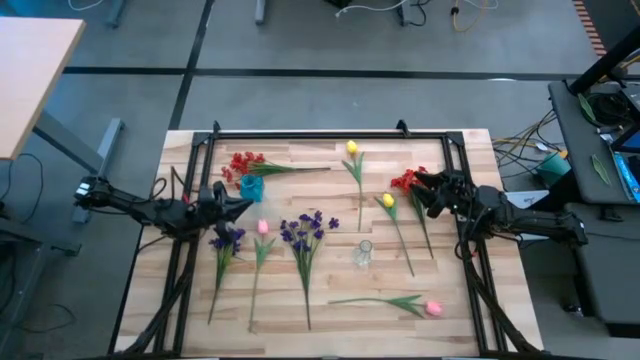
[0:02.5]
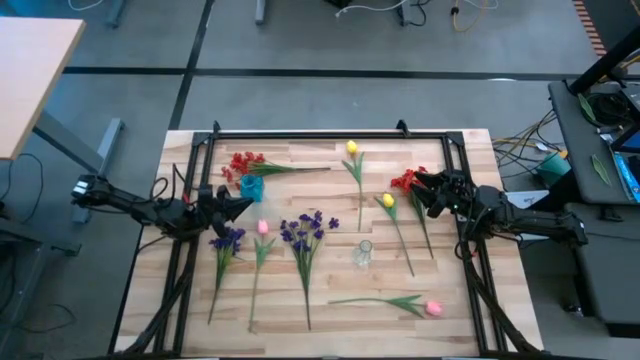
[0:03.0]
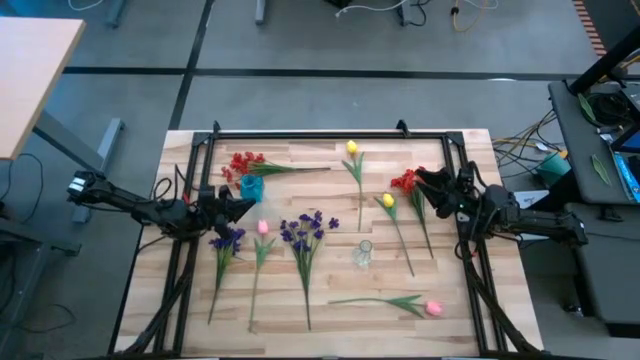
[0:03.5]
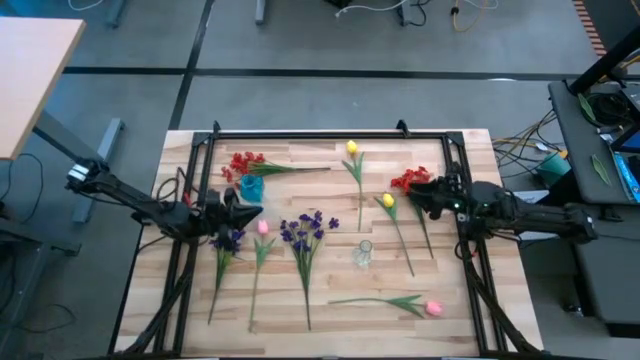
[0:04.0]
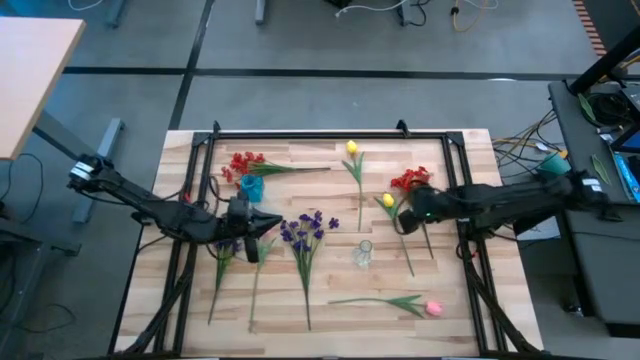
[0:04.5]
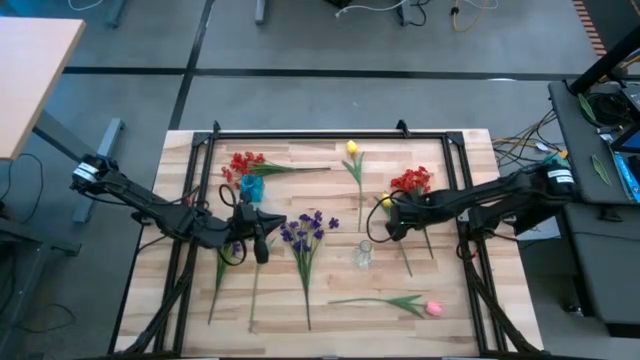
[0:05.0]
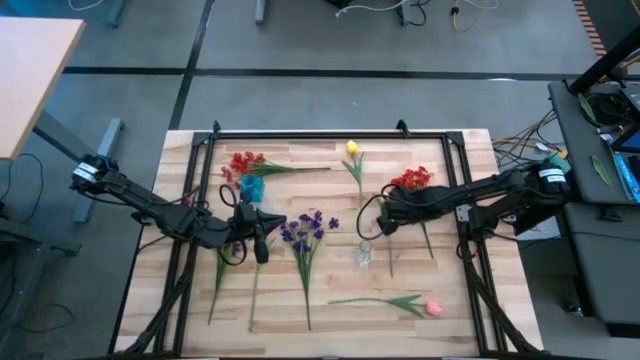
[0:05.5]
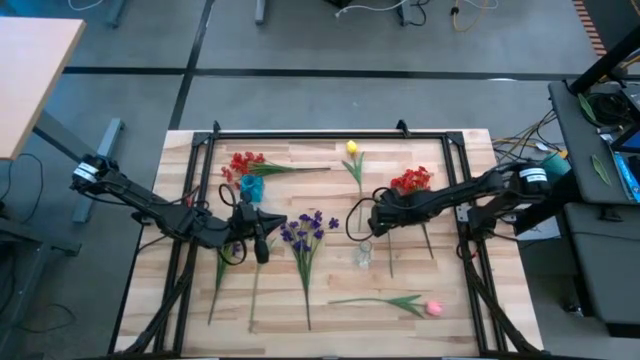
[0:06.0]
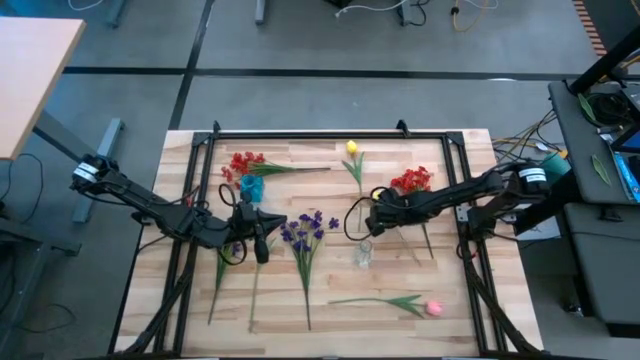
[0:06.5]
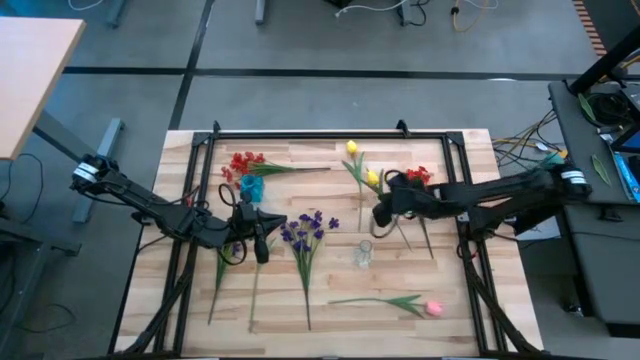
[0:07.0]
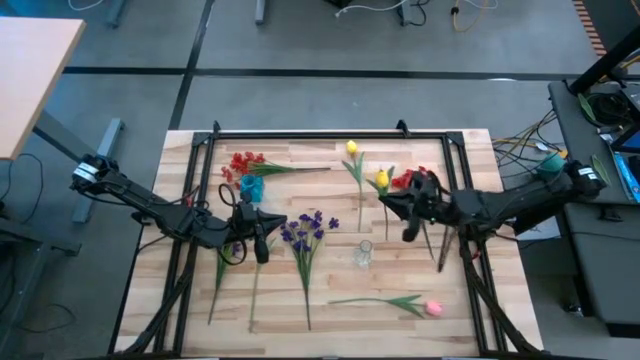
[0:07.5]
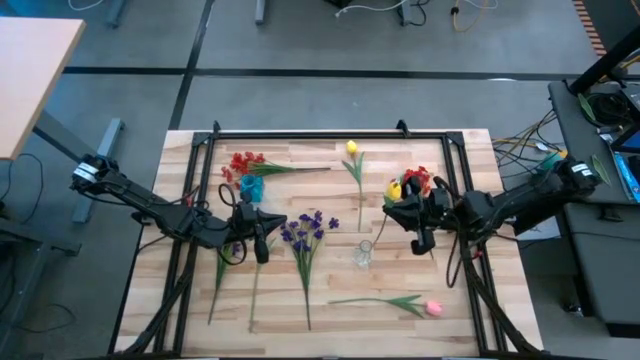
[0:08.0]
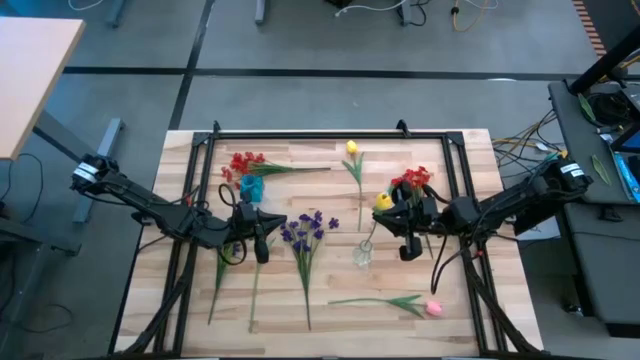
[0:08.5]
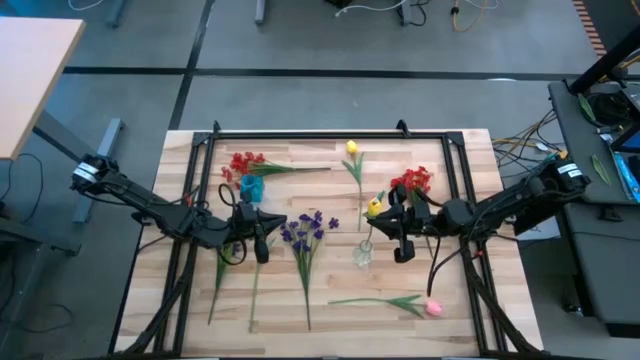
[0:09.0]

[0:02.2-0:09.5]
Task: Sort flowers into vase by color
Put the bottom yellow tulip into the transparent vase

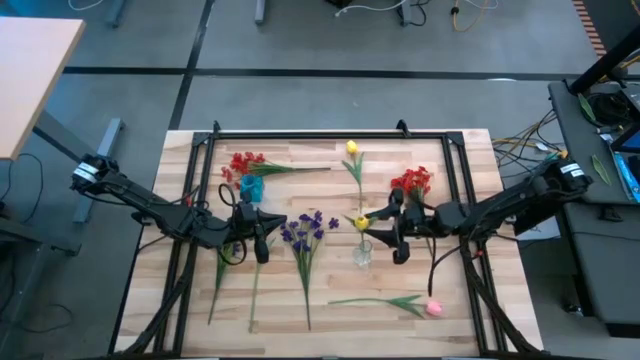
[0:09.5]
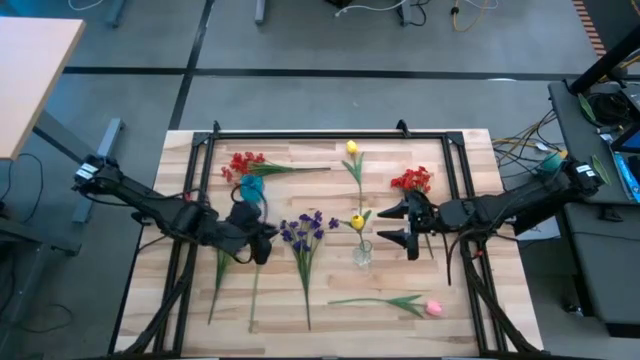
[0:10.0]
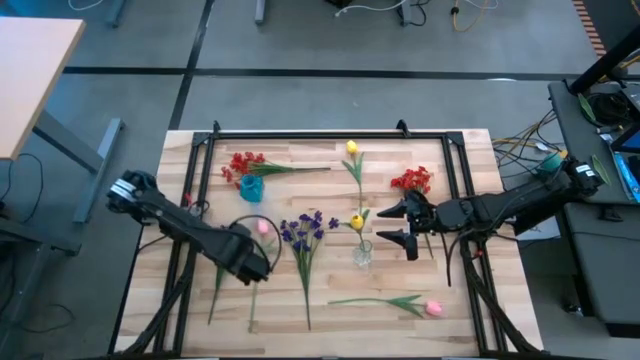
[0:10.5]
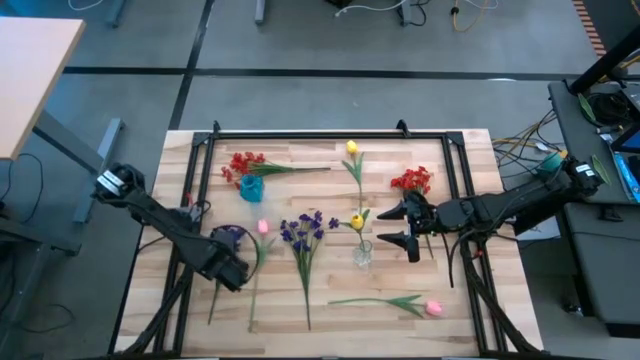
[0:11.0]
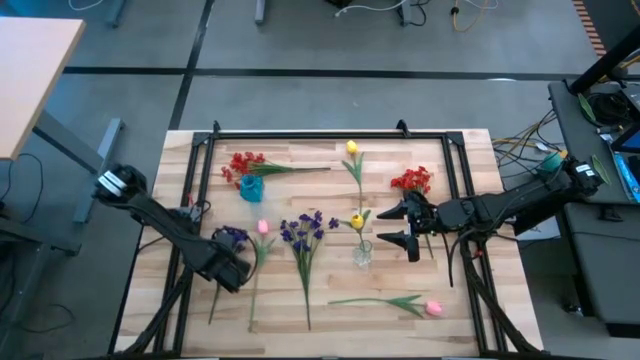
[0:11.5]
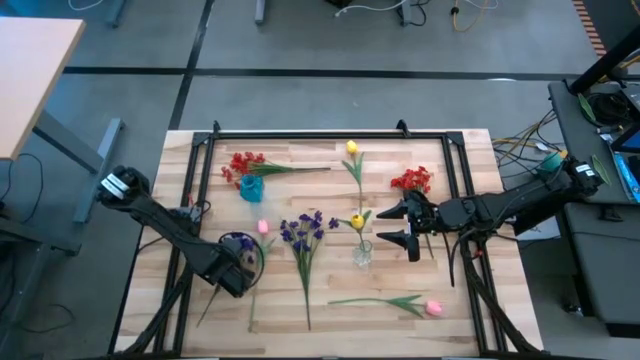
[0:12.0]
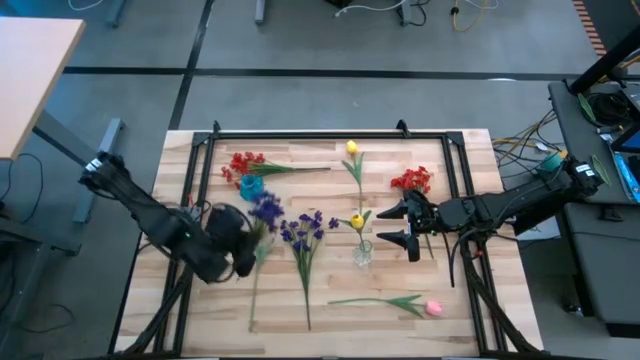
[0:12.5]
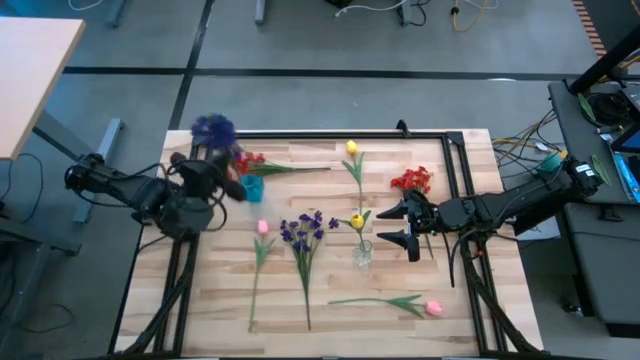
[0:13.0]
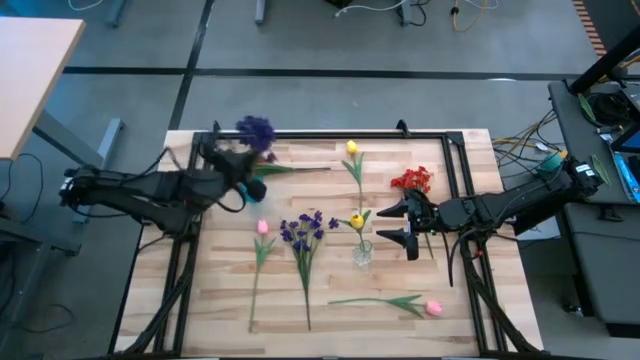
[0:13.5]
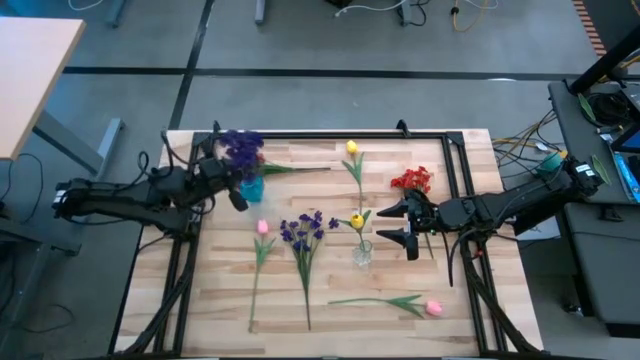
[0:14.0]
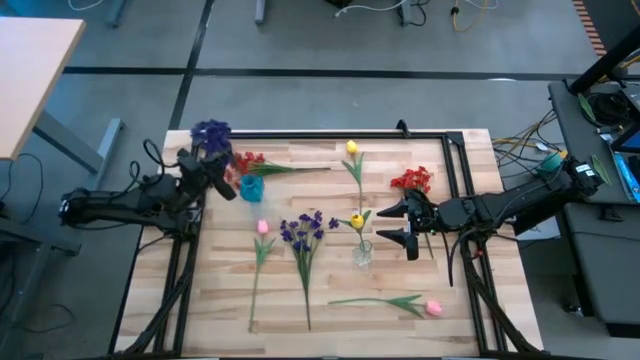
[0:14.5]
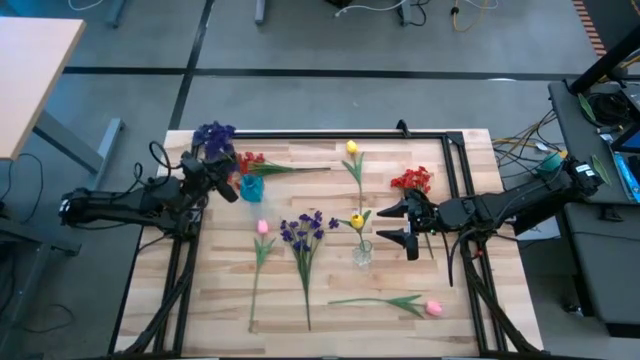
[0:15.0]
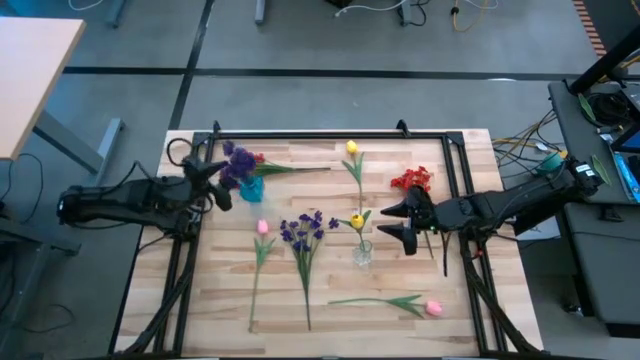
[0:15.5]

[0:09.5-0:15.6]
Put the left violet flowers into the blue vase

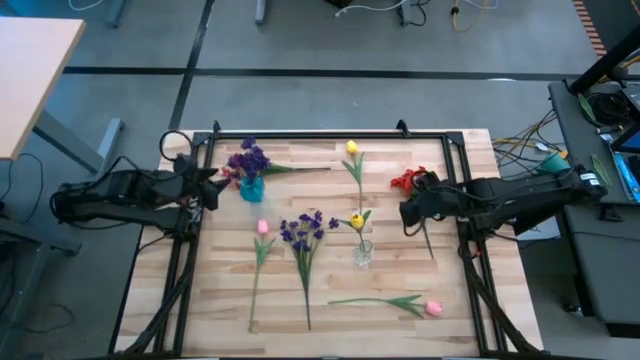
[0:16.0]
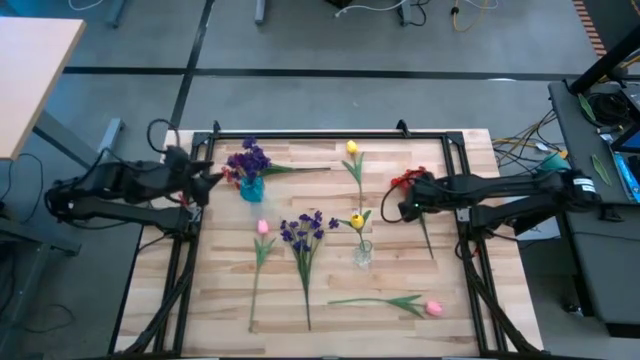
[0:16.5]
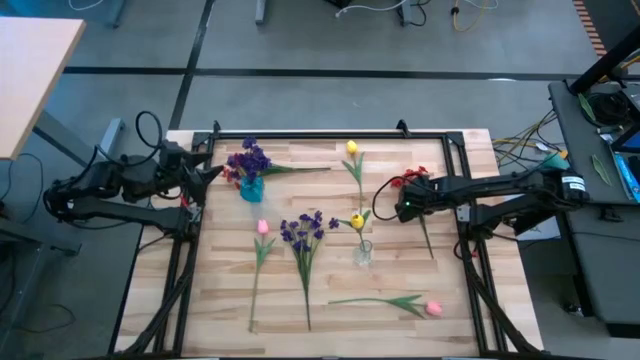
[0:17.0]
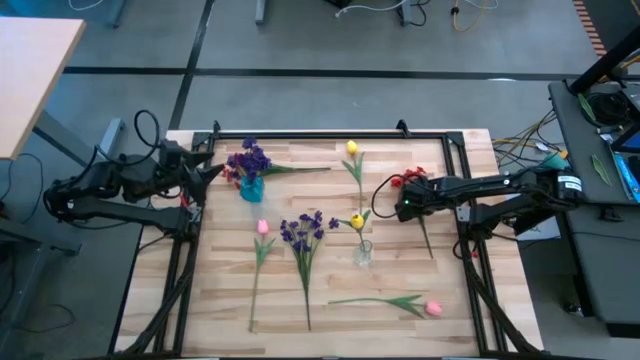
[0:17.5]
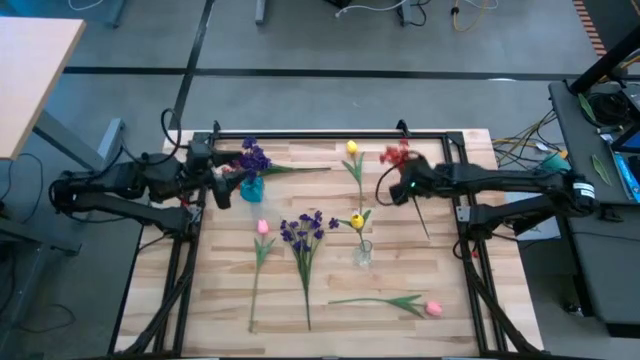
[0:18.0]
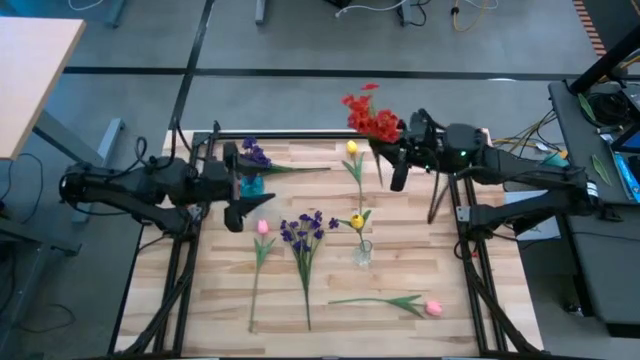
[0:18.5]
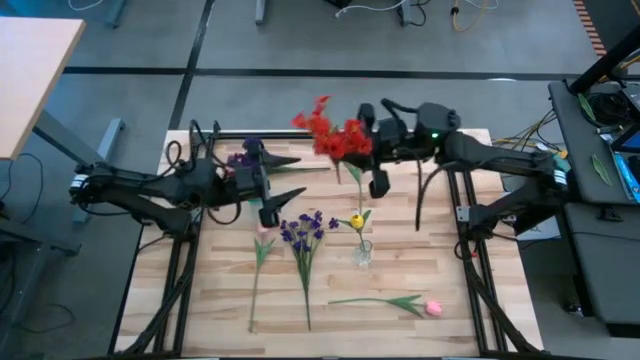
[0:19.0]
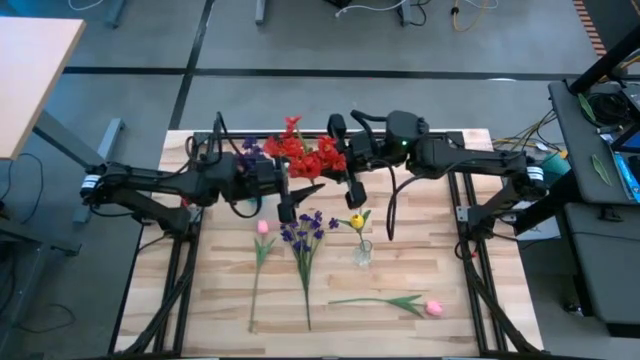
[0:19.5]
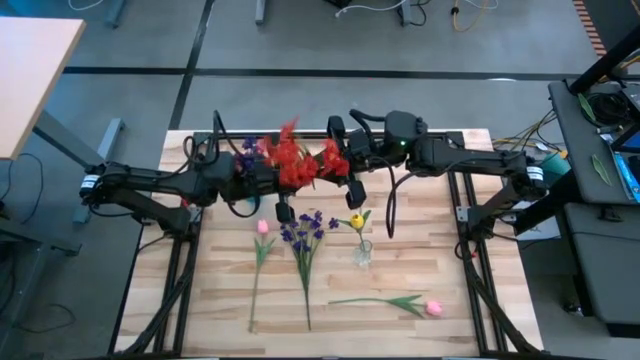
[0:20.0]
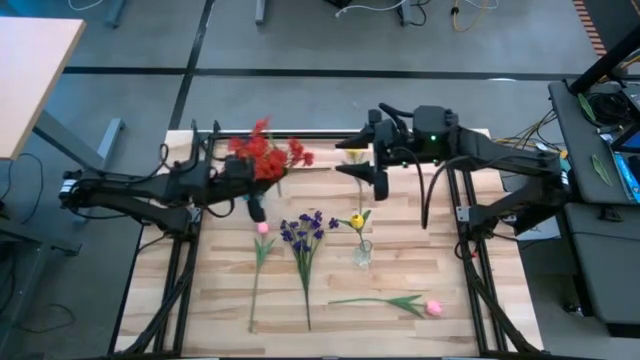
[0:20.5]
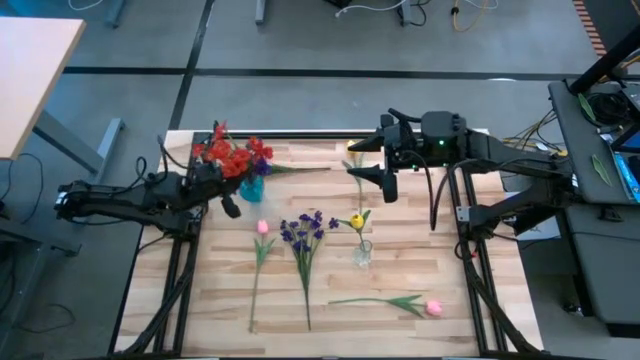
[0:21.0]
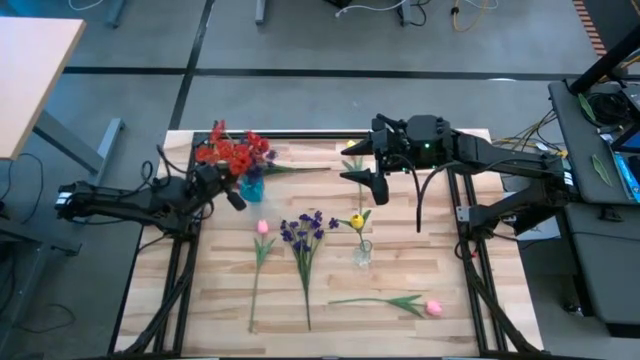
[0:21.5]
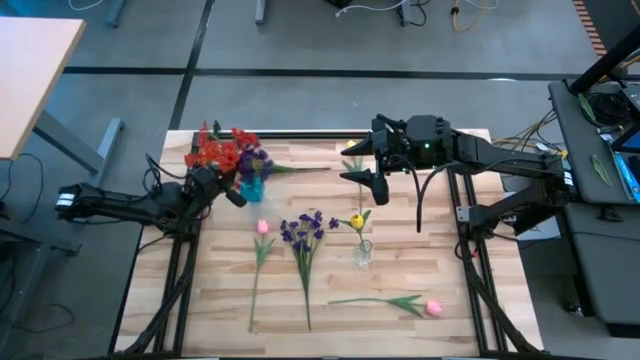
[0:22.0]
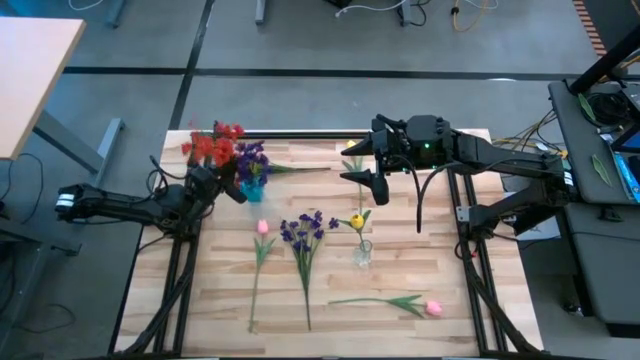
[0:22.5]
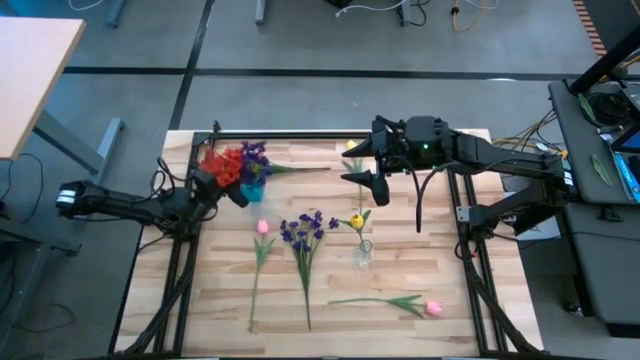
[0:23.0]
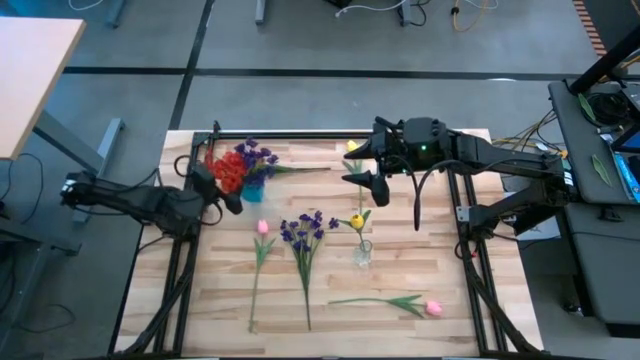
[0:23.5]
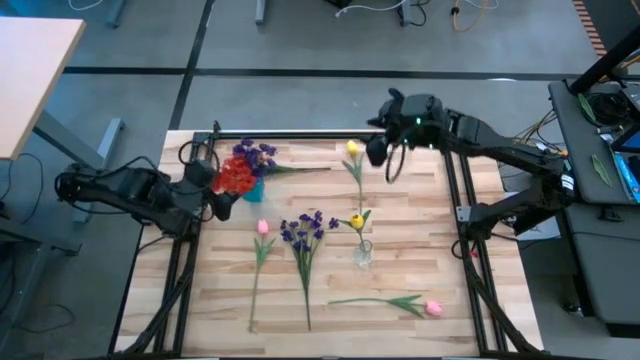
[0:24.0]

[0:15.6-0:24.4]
Put the bottom red flowers into the blue vase
